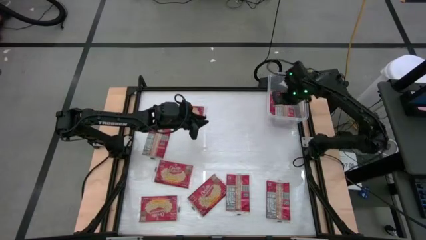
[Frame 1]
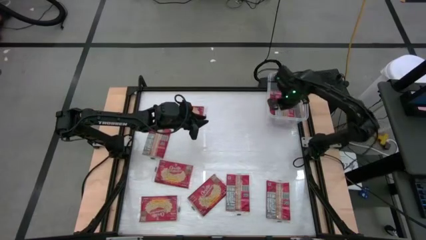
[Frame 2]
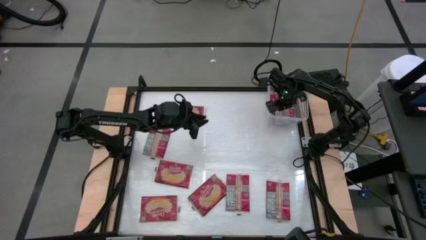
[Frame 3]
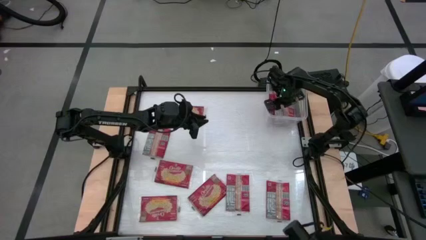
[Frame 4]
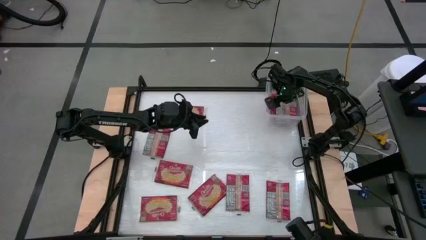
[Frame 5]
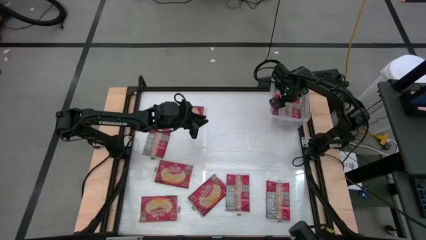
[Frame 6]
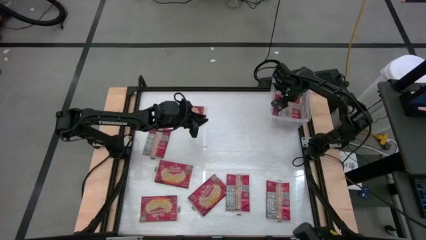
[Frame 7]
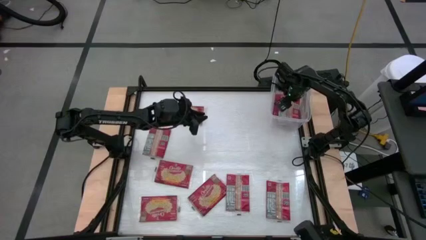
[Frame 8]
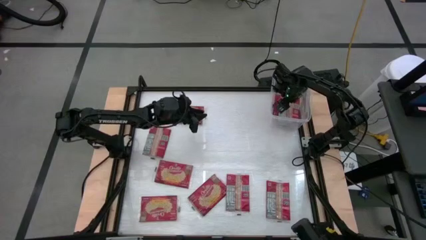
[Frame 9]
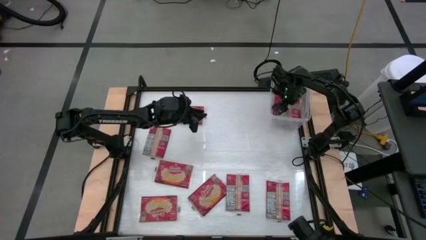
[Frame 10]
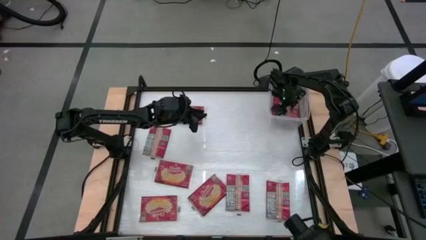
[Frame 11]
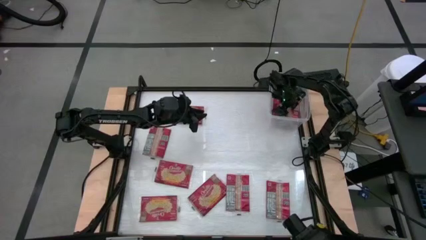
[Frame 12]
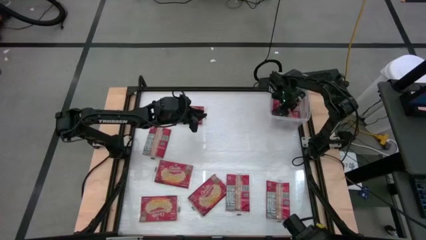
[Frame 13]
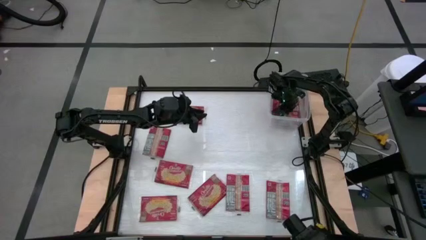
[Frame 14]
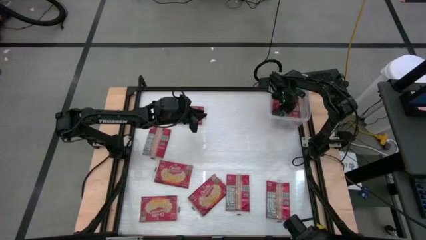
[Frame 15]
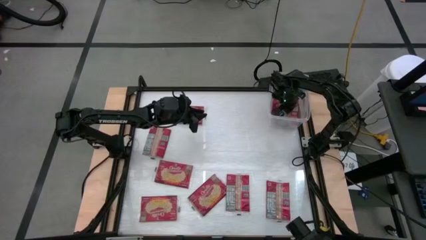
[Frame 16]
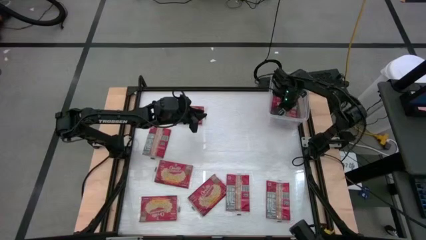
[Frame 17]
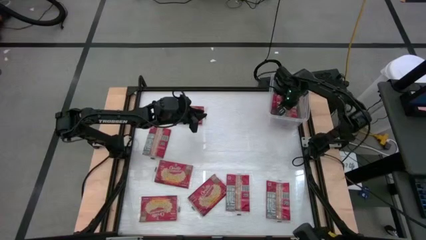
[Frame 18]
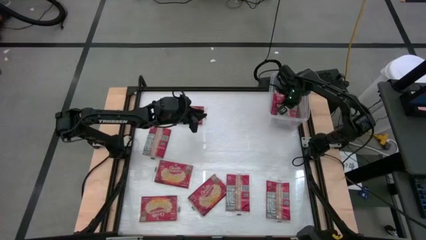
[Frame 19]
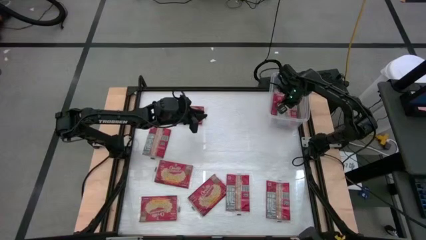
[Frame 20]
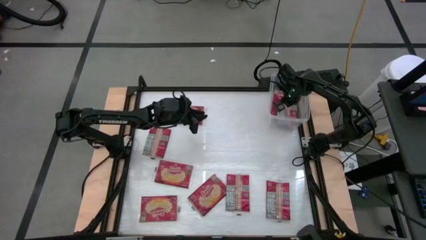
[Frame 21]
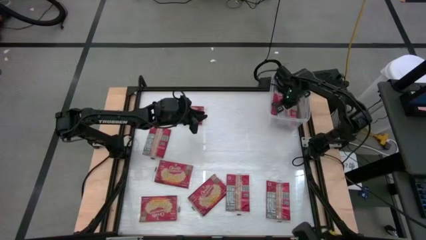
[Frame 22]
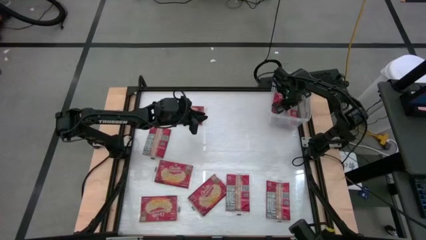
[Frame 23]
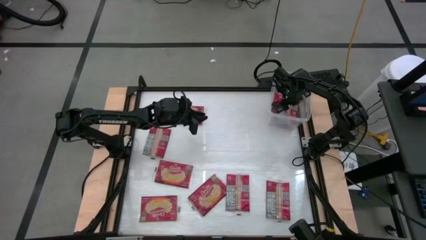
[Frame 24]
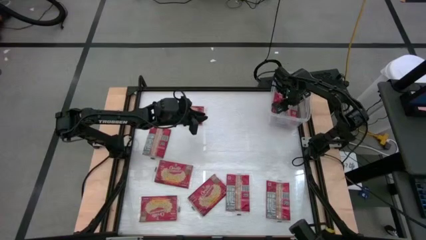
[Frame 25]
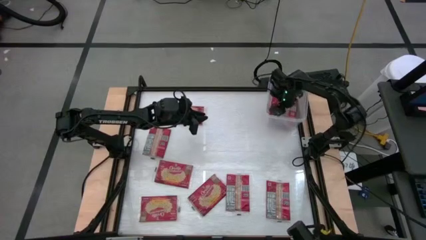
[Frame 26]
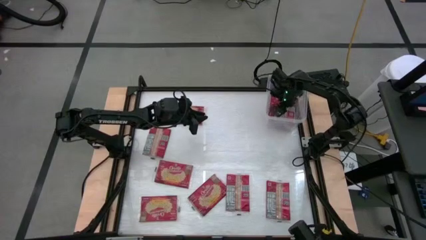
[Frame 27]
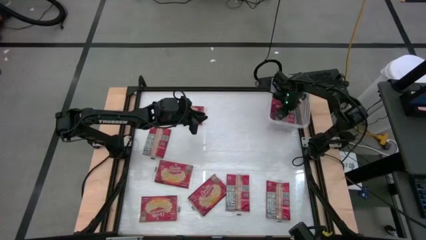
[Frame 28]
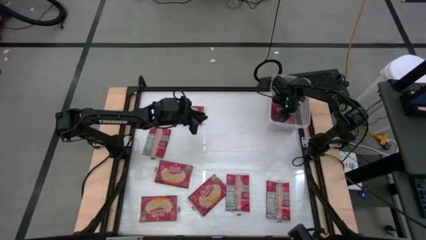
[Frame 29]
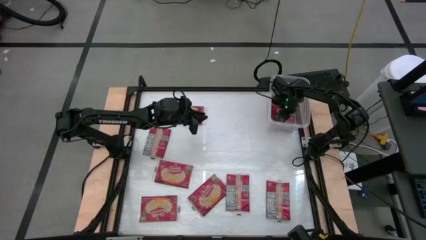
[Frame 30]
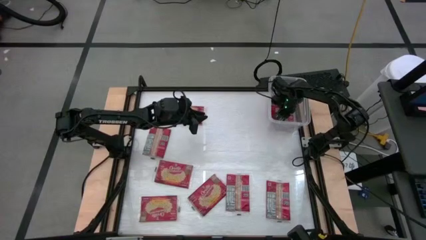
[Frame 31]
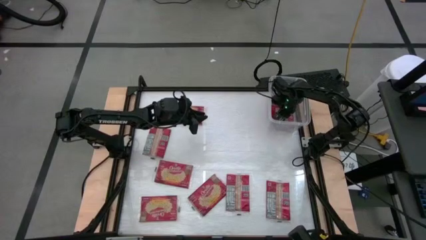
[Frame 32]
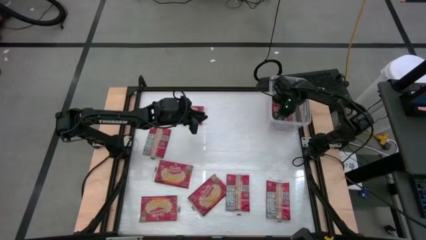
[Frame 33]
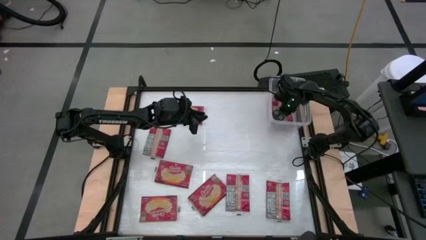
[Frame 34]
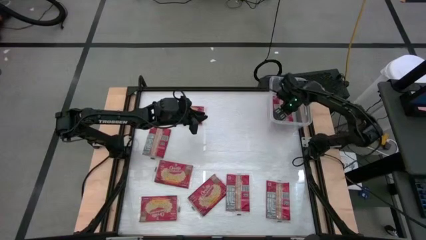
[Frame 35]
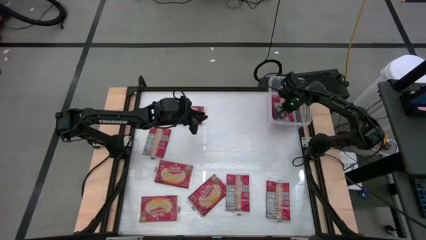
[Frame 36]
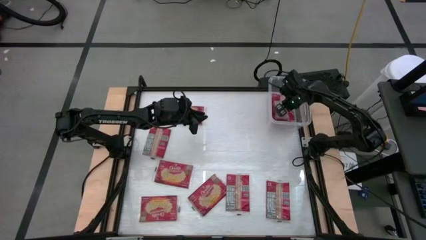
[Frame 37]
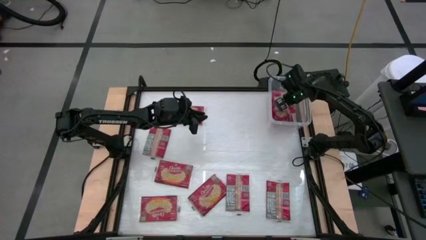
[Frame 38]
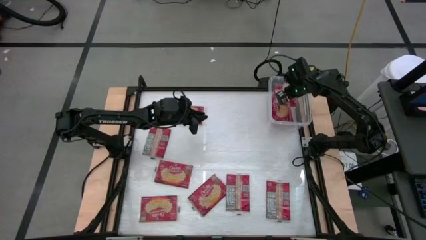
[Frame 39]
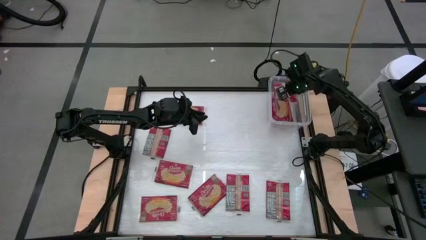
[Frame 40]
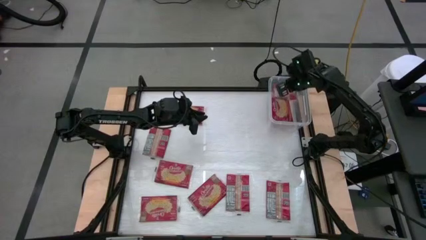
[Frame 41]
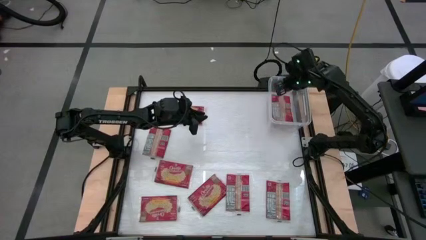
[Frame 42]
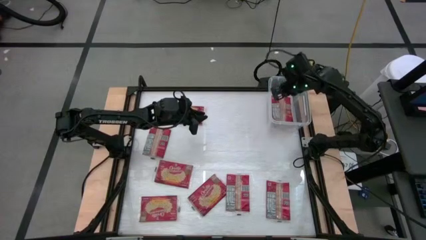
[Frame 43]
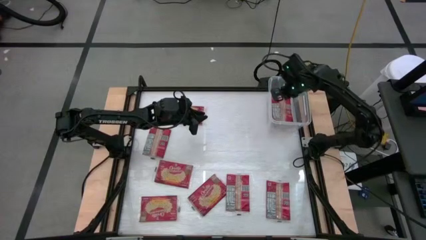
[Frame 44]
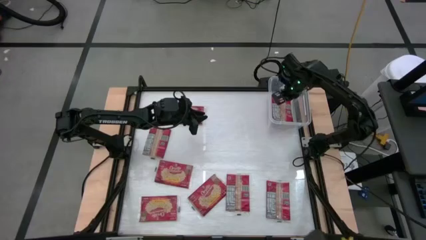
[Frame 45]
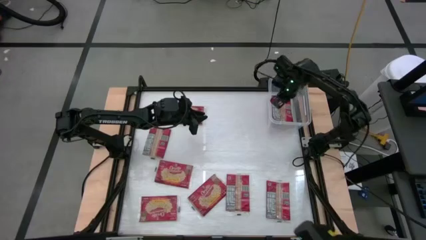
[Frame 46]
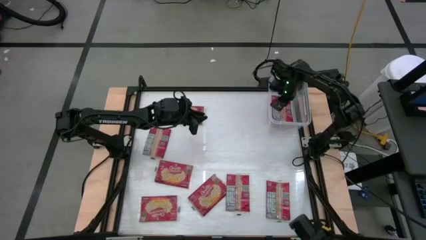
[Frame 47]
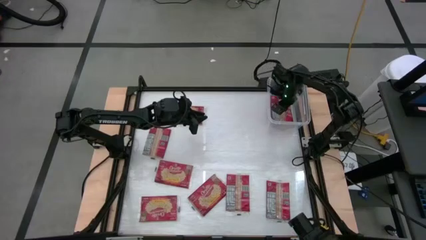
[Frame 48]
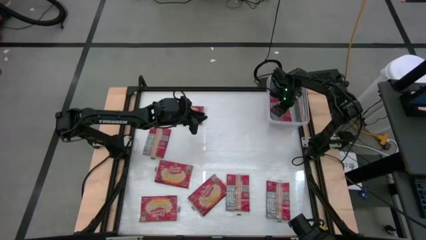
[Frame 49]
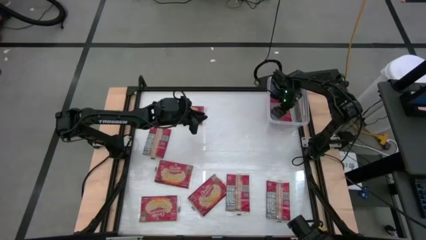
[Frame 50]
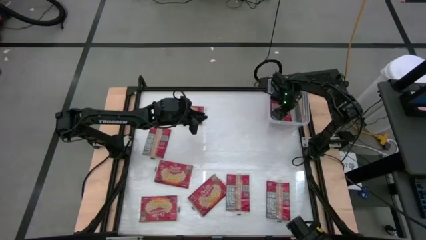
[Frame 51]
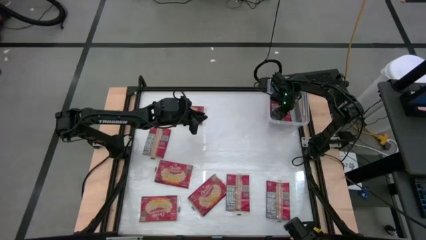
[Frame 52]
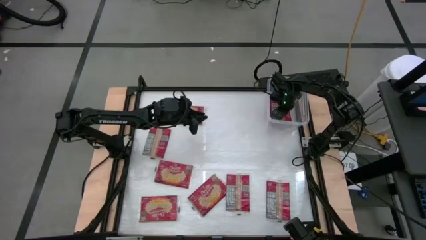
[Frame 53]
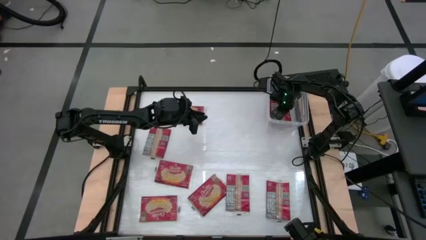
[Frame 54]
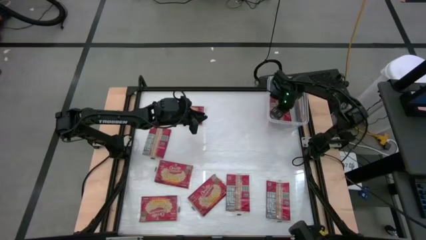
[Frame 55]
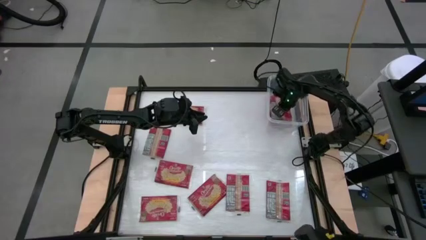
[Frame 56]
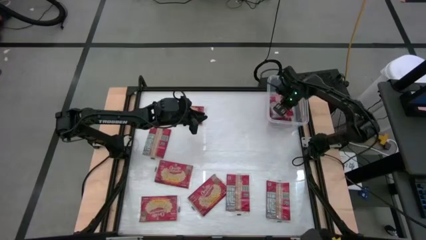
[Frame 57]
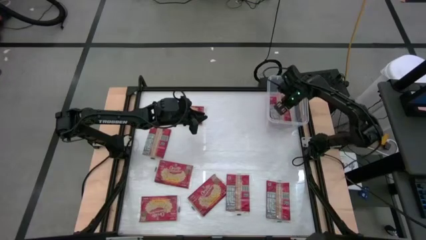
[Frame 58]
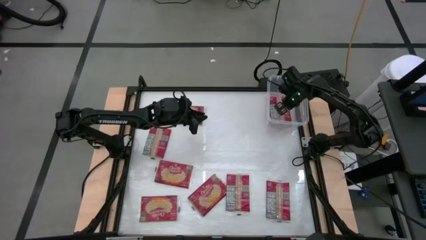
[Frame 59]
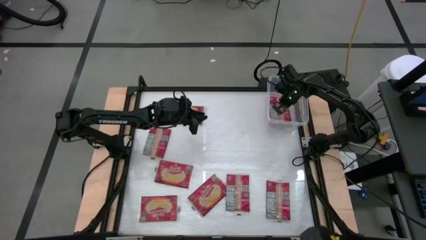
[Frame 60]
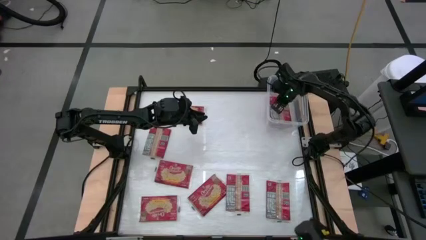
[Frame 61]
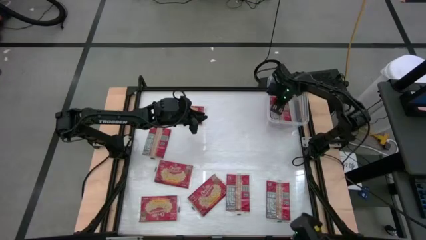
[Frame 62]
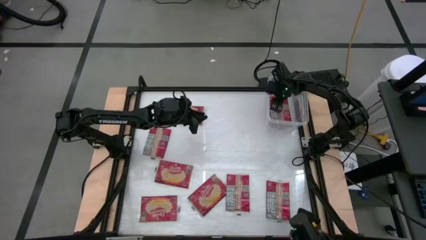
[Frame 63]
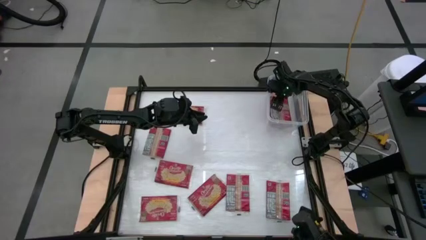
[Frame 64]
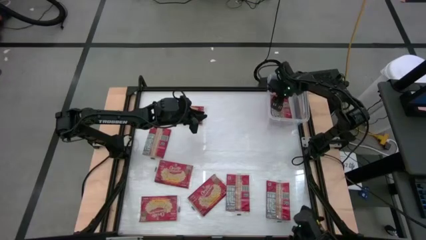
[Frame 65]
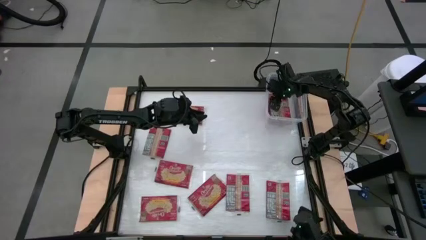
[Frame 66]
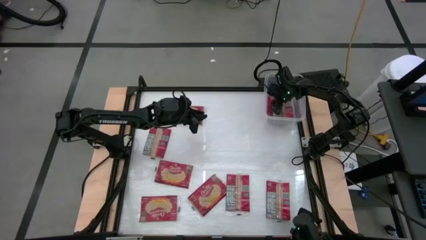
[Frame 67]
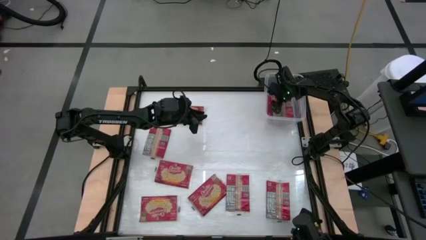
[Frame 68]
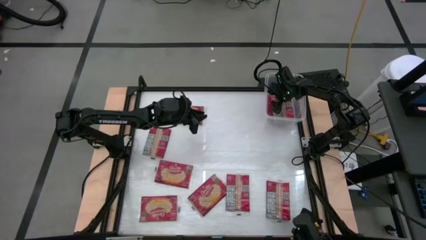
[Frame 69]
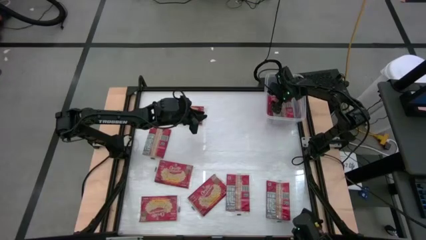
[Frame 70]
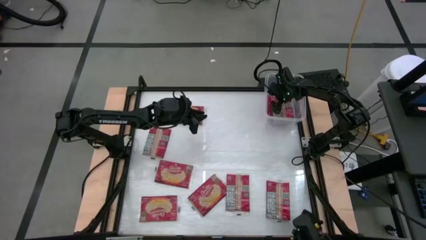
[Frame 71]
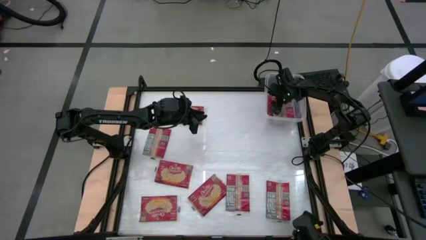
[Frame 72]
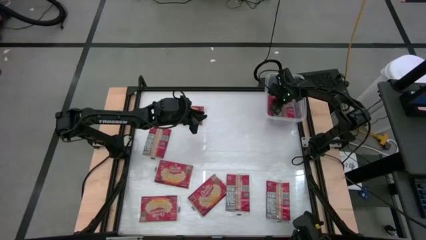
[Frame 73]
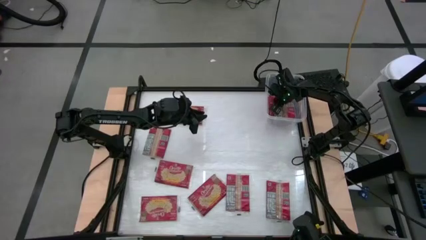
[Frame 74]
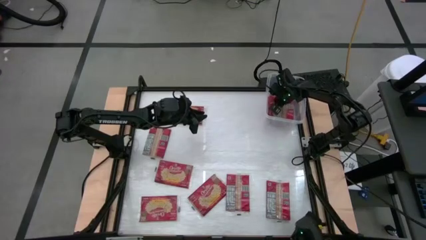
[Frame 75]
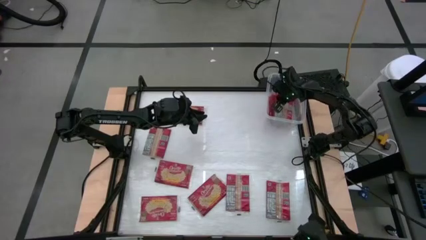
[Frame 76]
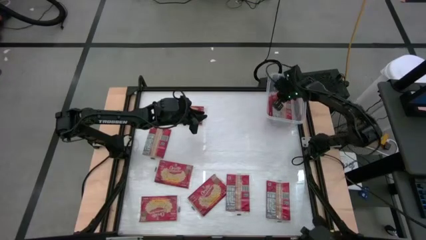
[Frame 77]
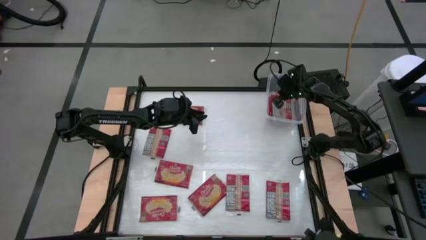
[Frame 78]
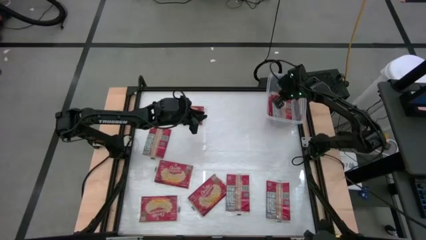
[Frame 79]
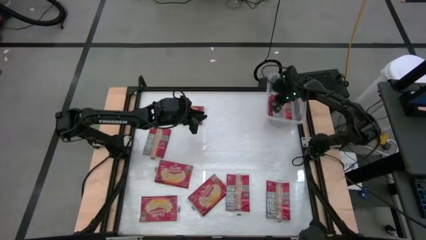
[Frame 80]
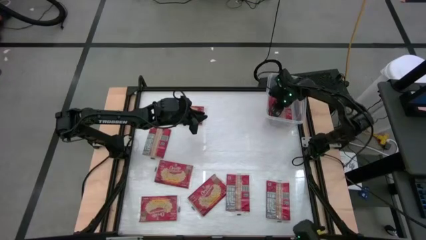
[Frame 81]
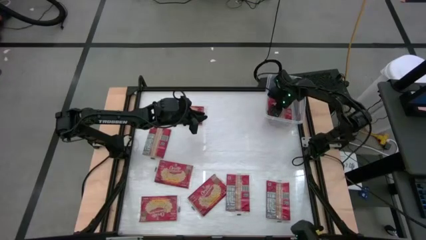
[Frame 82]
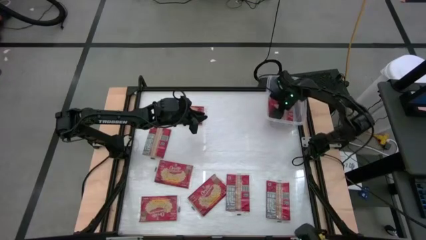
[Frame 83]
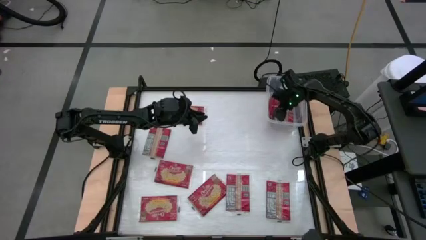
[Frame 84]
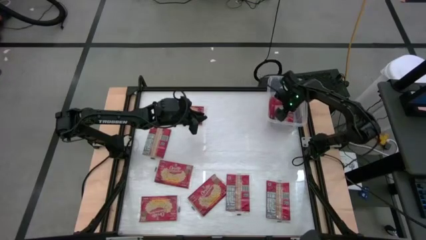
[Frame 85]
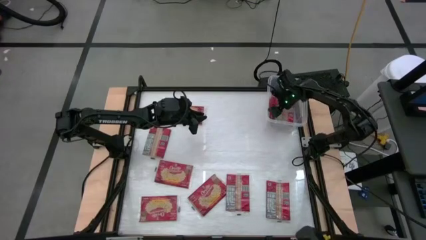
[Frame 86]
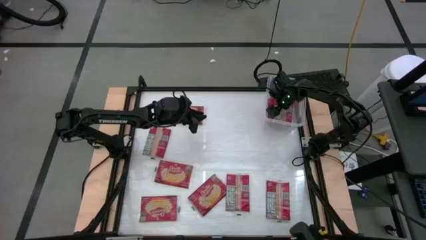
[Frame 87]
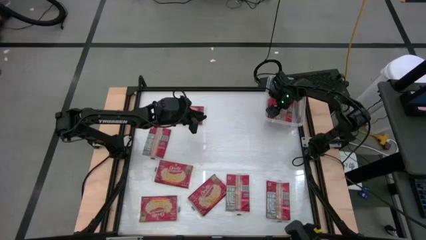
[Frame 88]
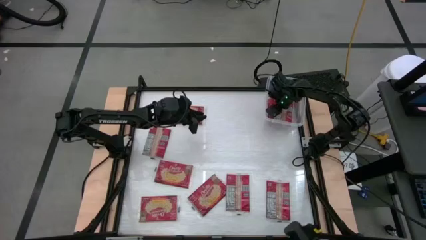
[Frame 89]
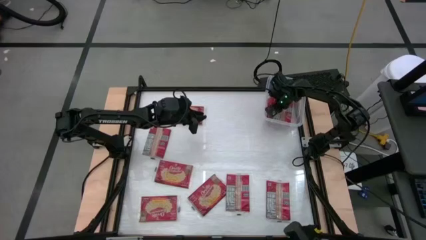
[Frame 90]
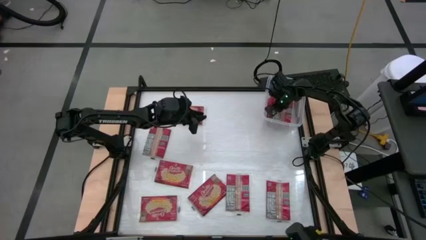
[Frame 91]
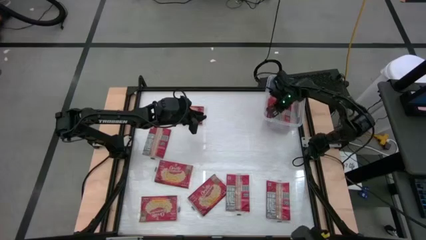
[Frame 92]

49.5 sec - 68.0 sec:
Task: Sort popcorn bags into baskets
Put the red popcorn bag into the transparent container
